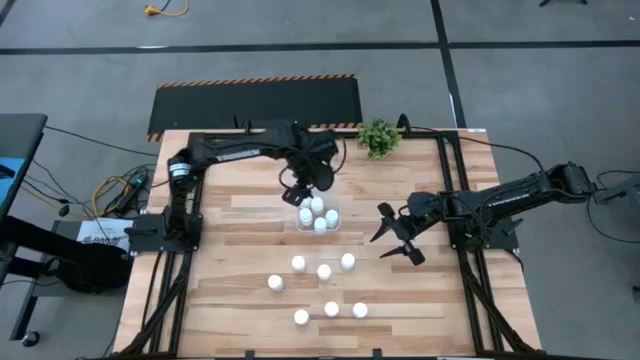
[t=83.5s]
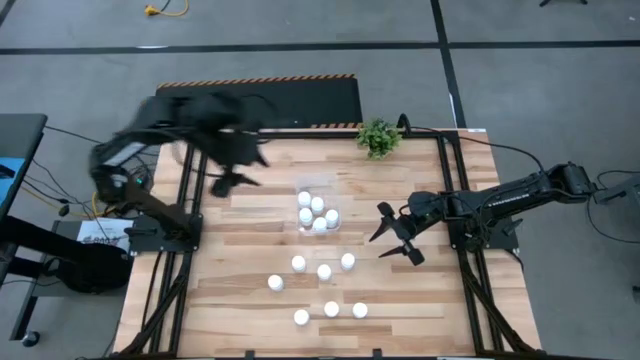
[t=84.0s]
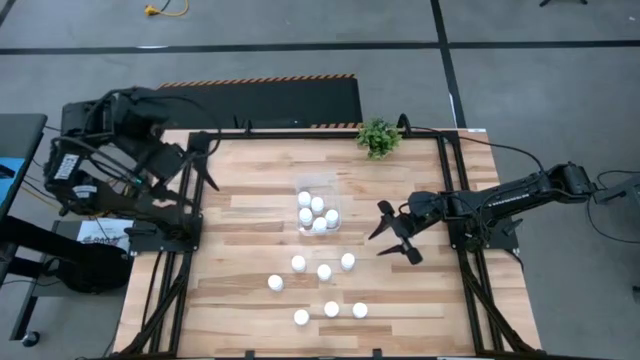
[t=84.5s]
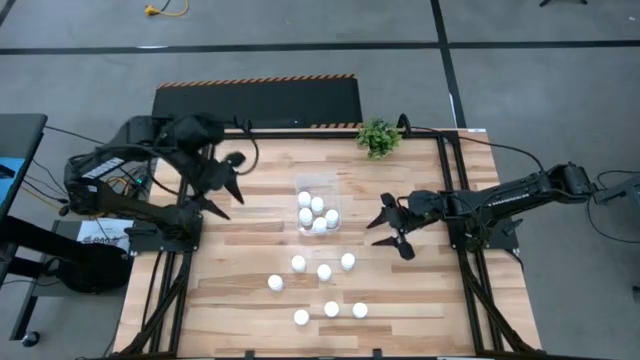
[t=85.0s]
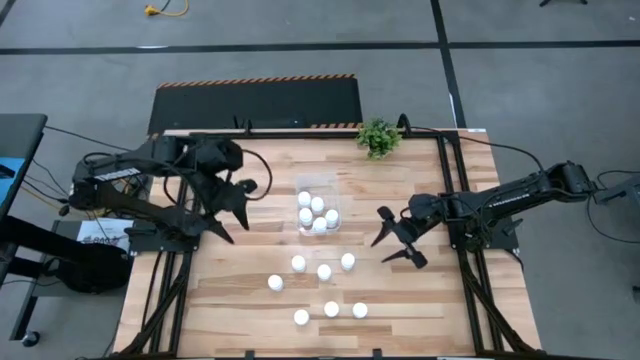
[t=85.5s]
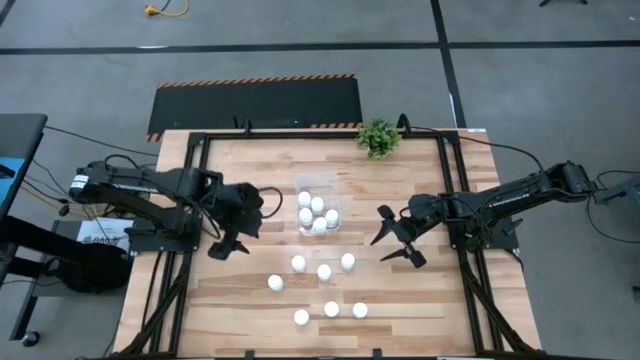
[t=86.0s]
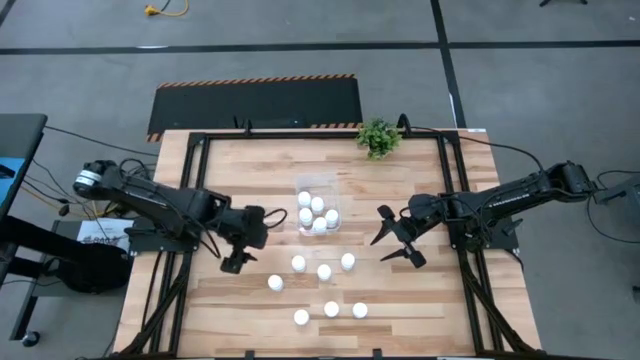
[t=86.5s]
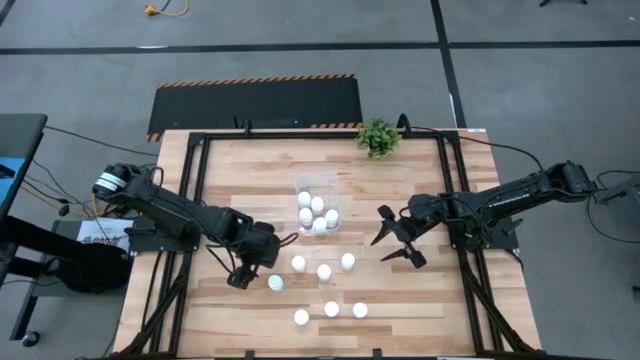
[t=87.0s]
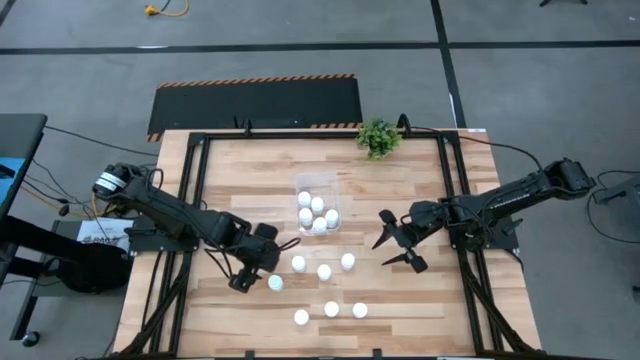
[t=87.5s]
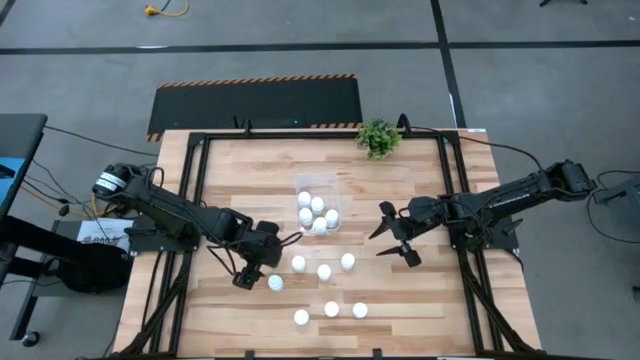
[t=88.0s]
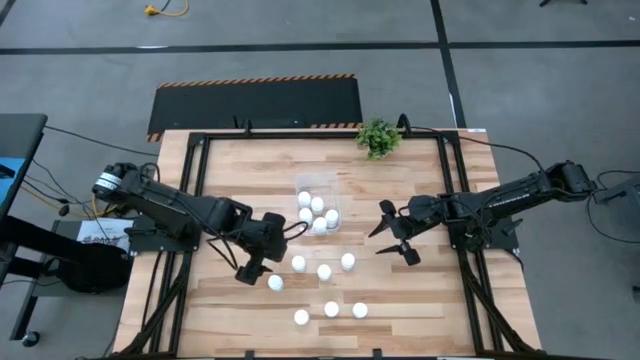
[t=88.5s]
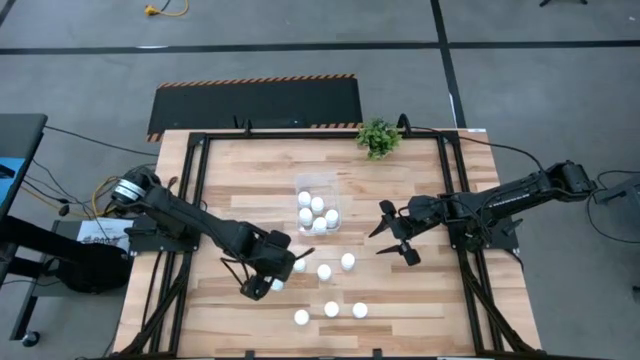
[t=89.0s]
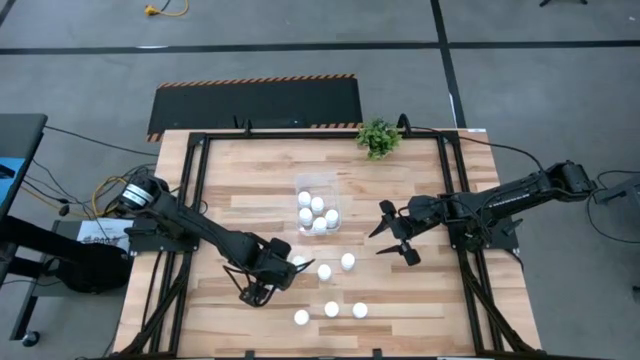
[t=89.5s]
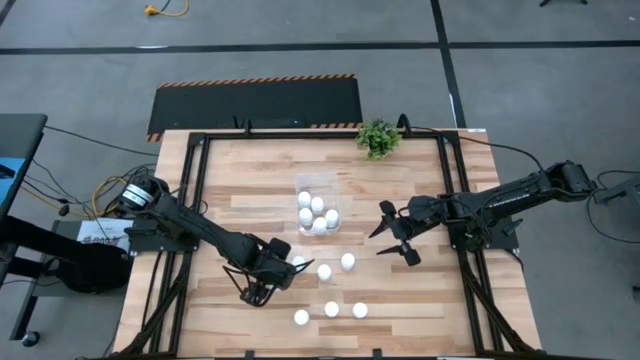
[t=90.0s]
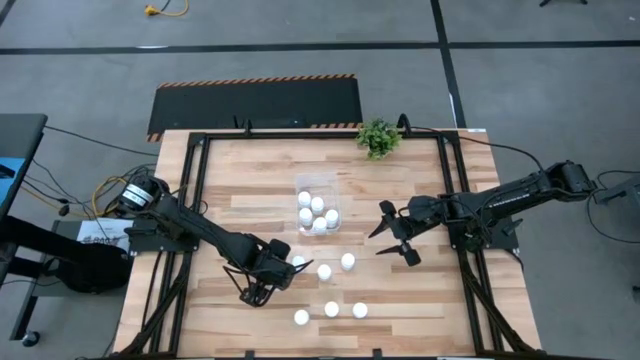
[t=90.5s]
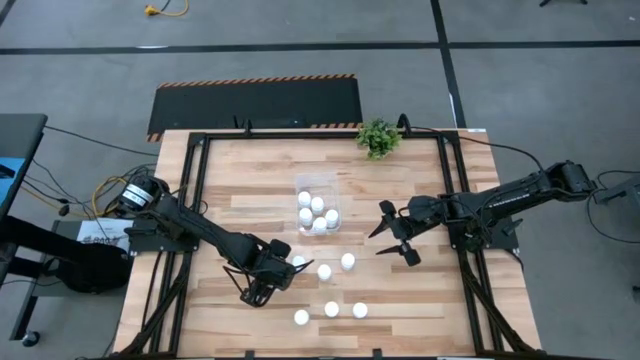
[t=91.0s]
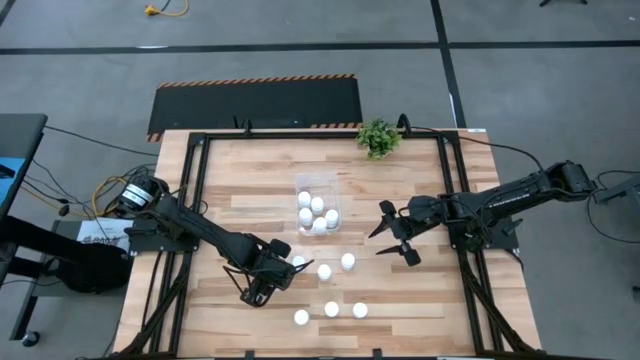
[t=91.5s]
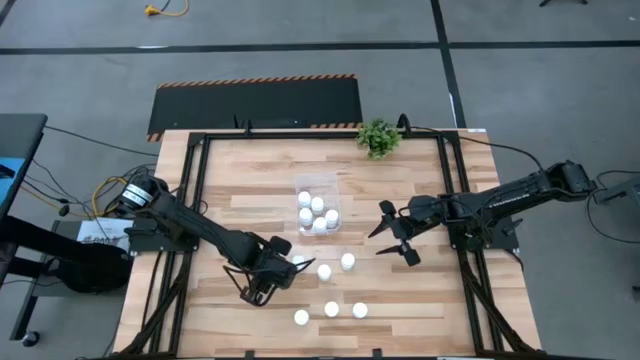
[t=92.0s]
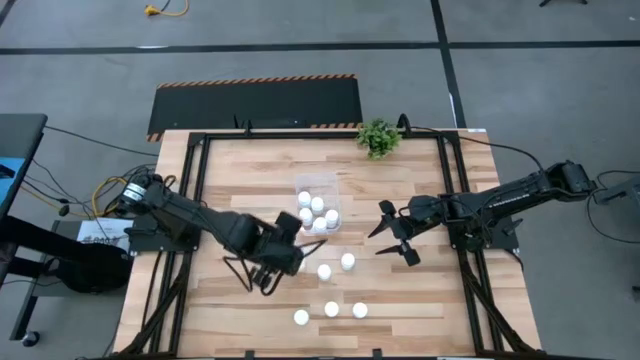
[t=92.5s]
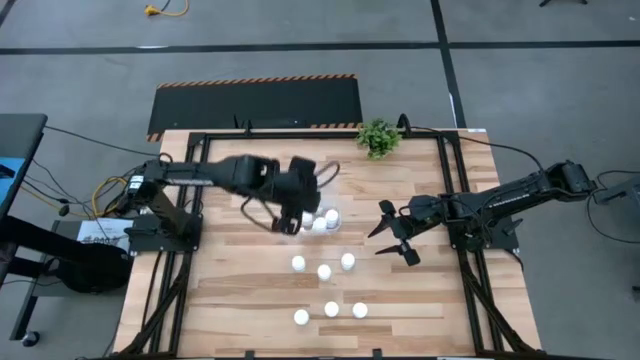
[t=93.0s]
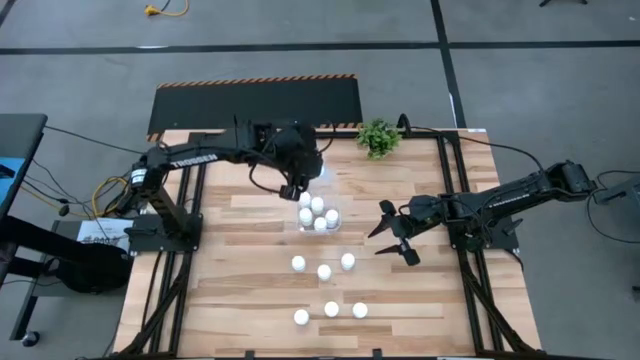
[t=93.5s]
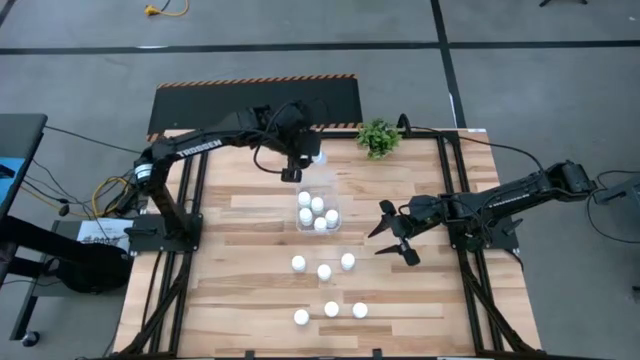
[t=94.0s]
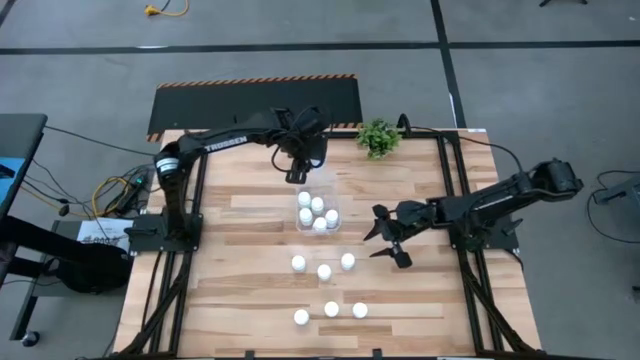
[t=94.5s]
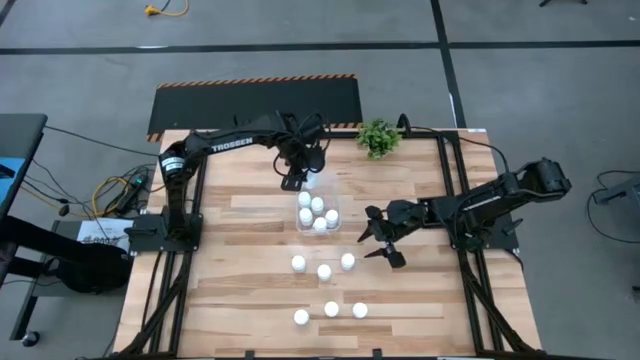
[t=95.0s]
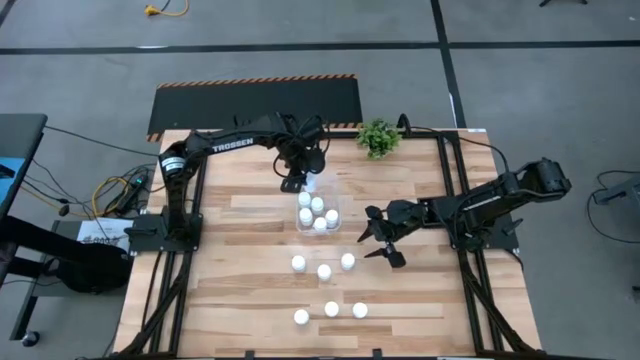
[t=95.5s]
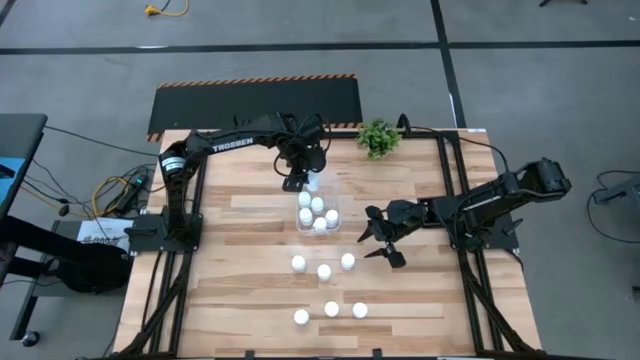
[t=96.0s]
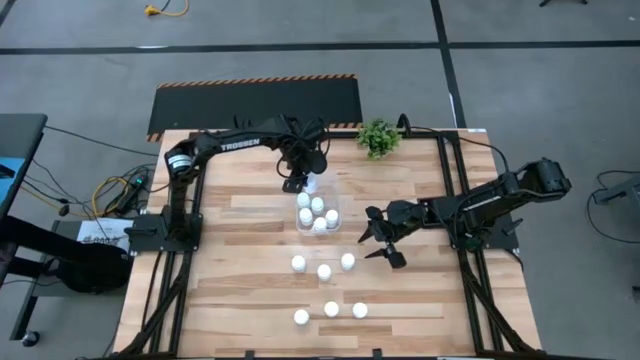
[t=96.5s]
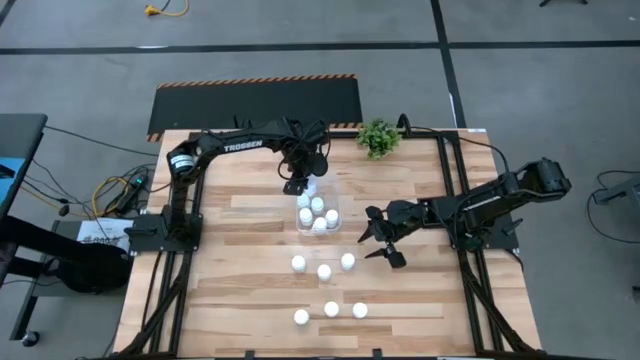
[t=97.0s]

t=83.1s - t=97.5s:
Task: Pick and place pill bottles into a basket
Put the pill bottles into the container

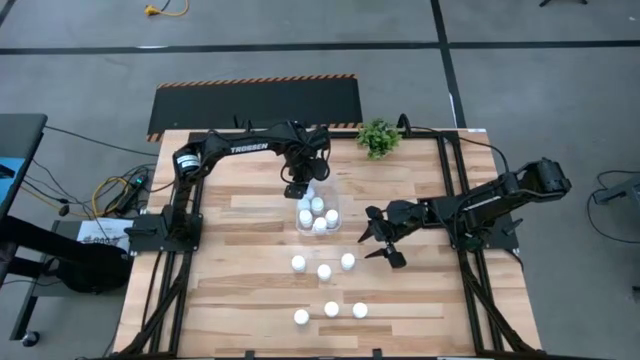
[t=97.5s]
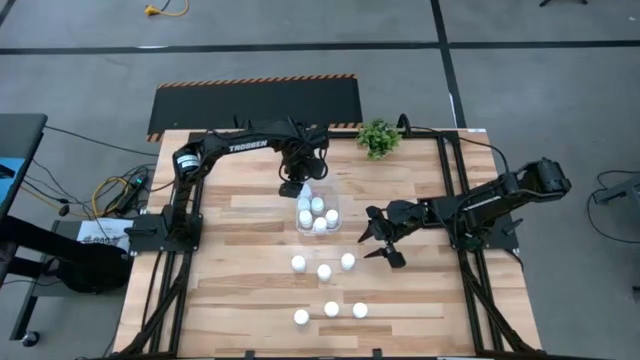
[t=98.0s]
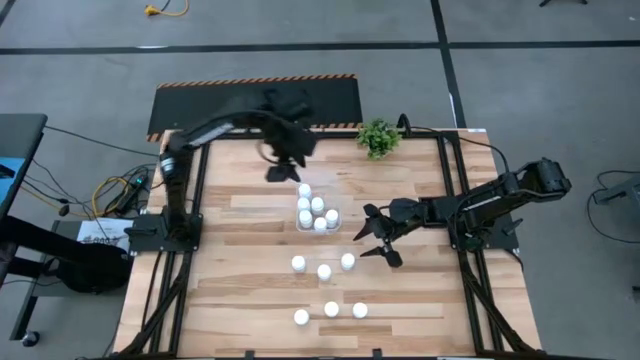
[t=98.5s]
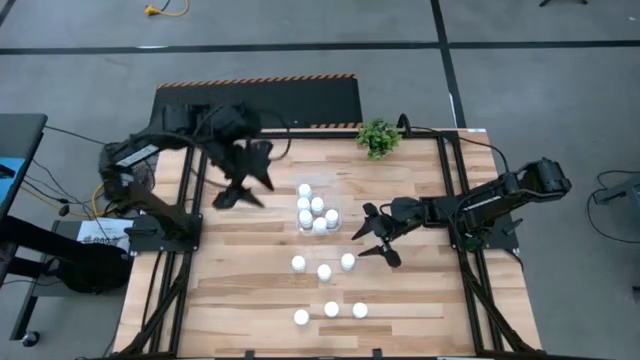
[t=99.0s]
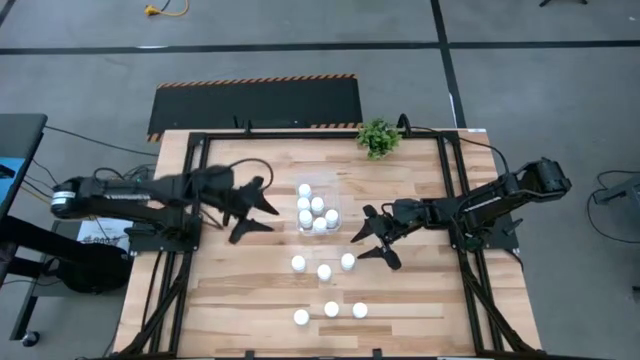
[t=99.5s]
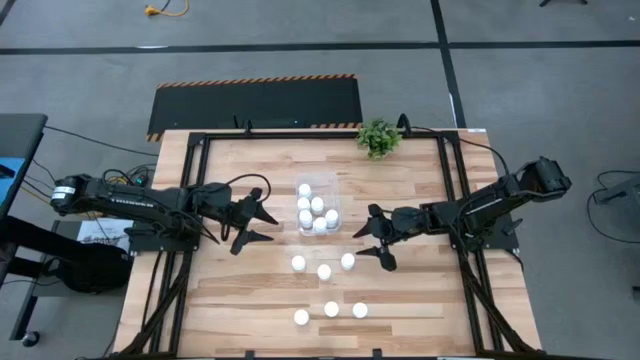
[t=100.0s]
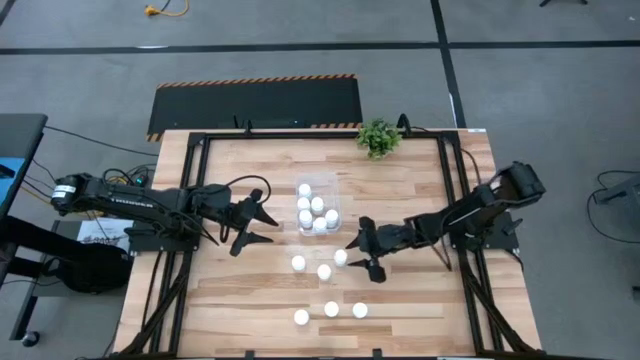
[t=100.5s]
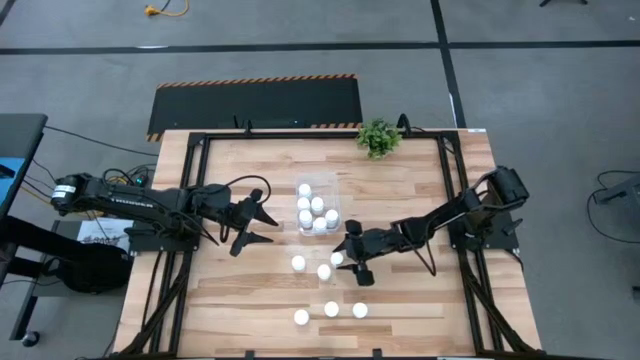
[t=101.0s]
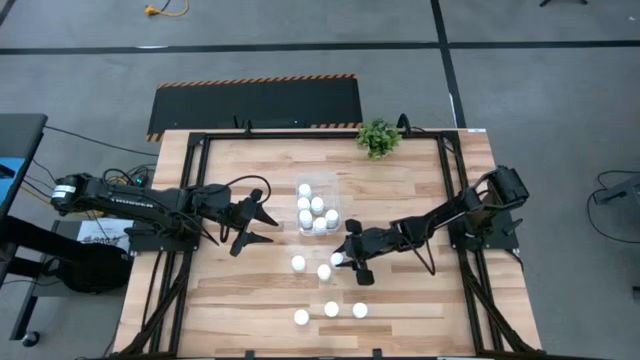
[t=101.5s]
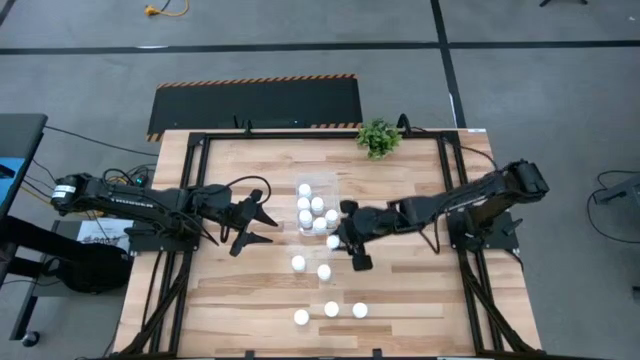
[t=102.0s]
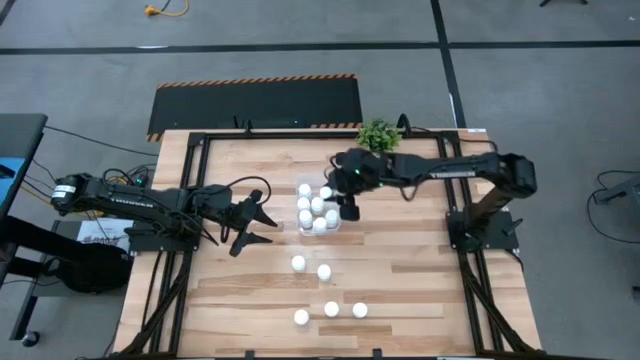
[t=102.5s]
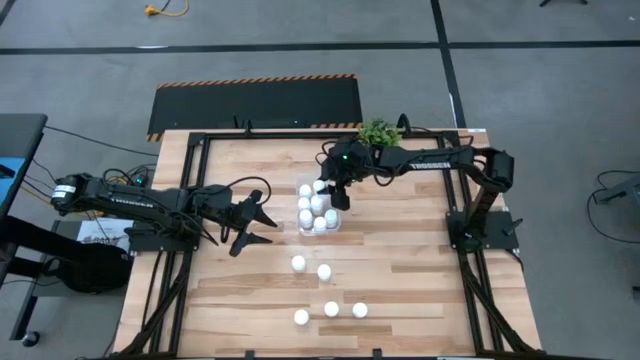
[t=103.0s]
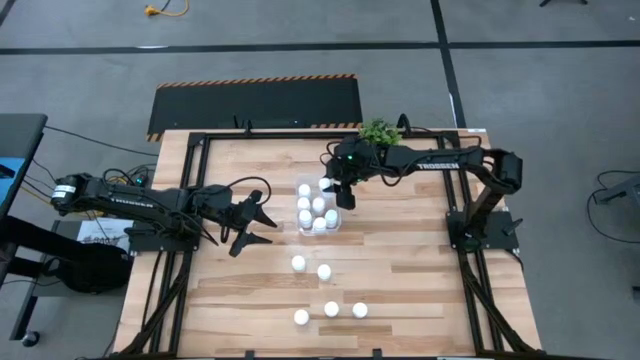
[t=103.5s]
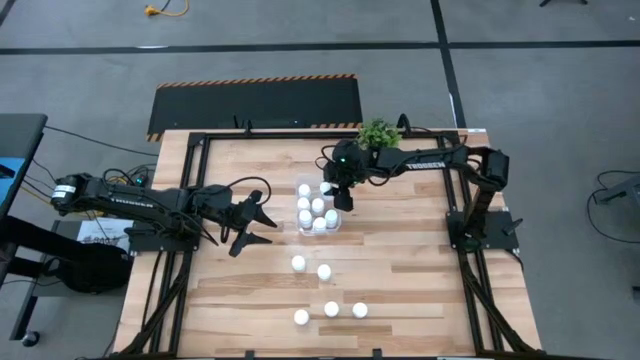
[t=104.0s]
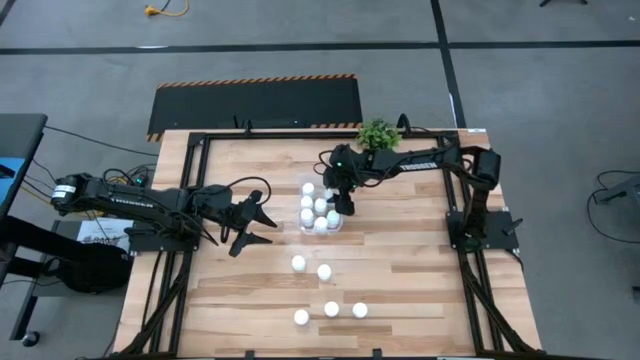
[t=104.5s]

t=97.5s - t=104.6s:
Put the pill bottles into the container
